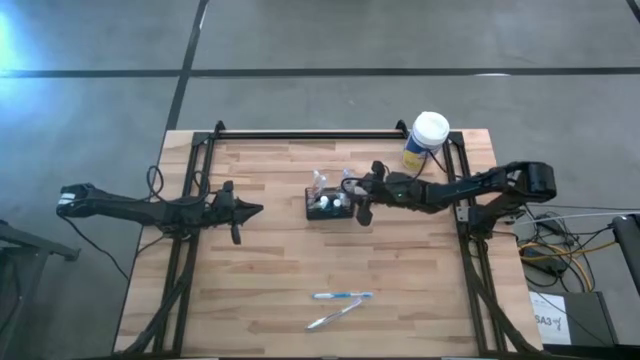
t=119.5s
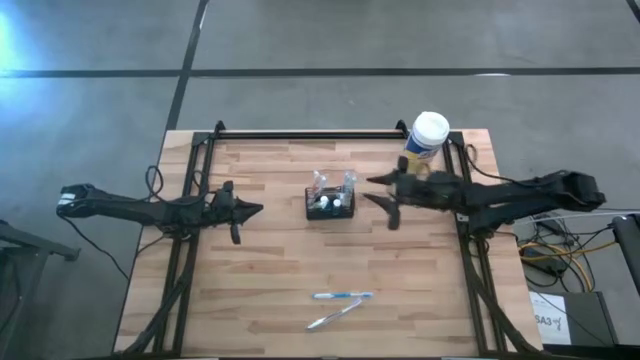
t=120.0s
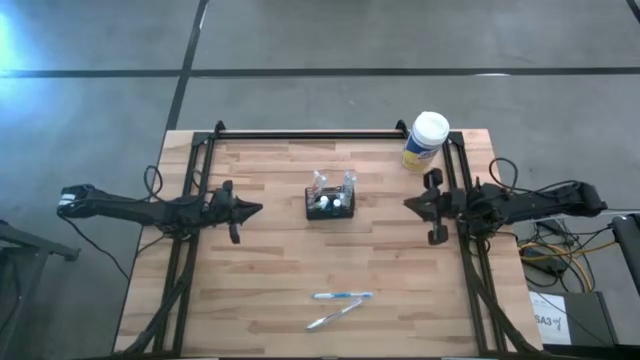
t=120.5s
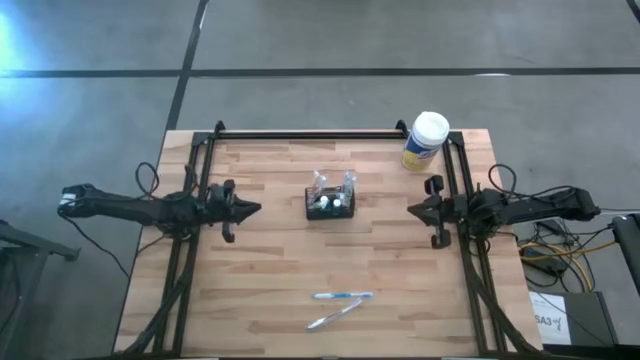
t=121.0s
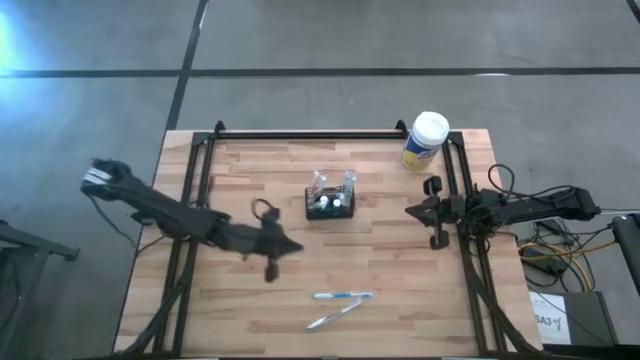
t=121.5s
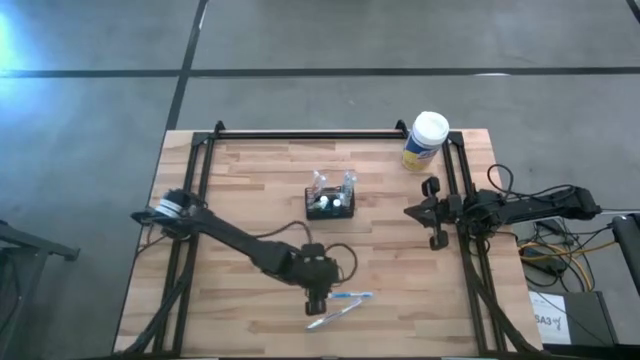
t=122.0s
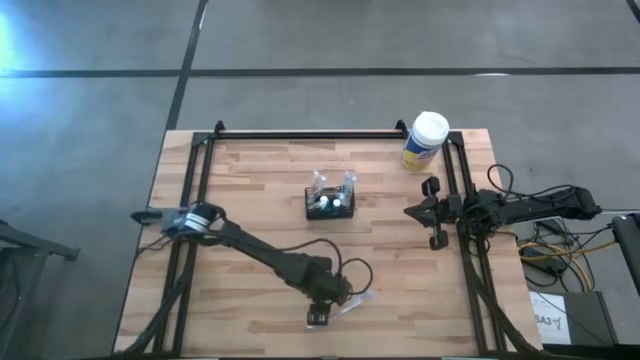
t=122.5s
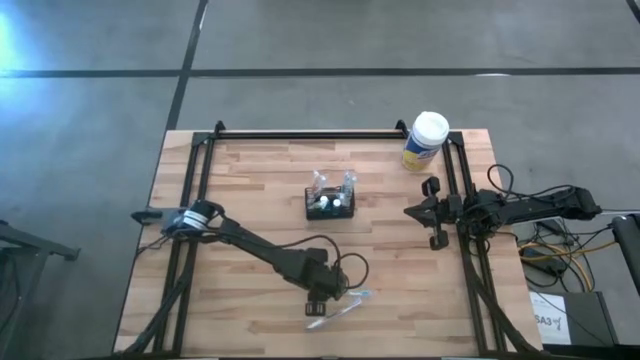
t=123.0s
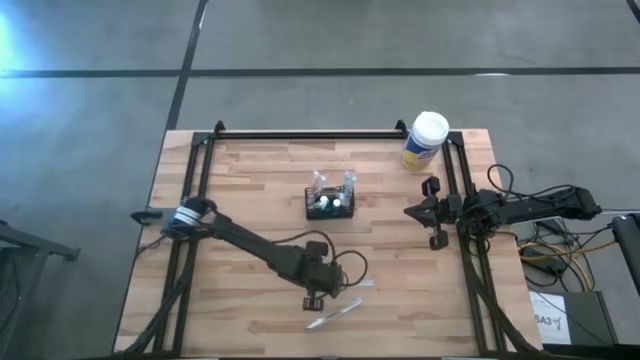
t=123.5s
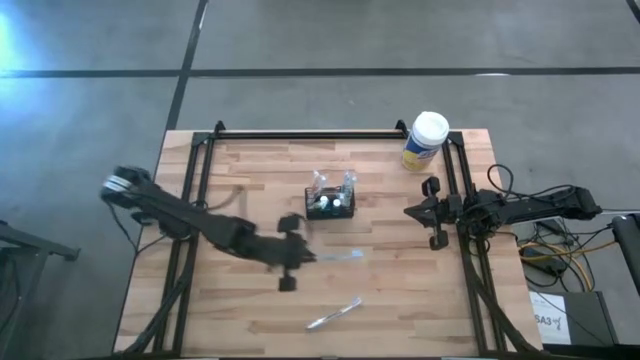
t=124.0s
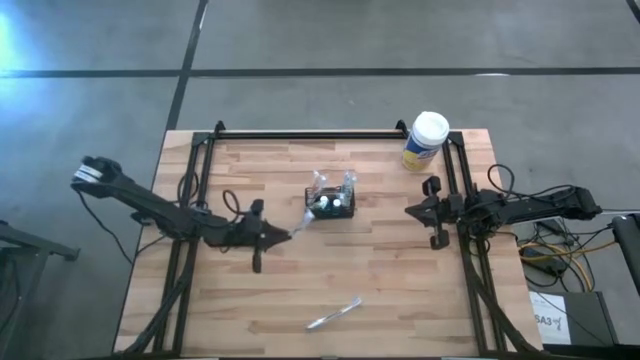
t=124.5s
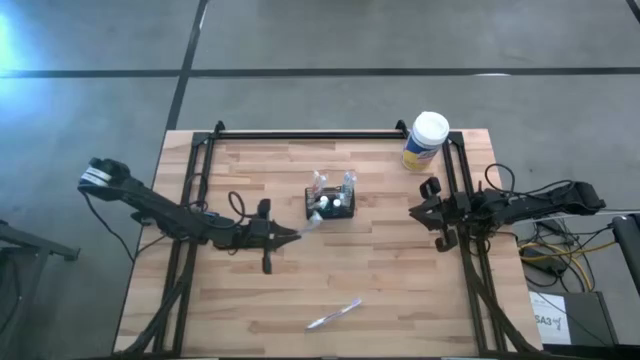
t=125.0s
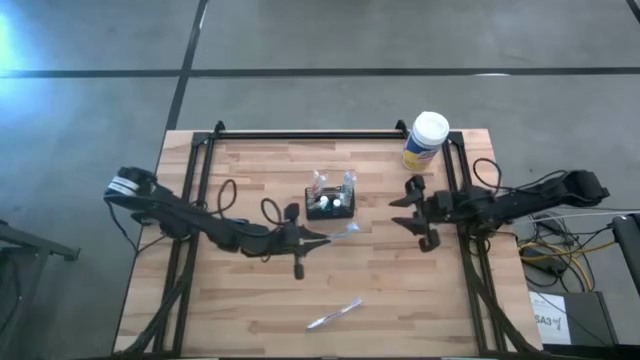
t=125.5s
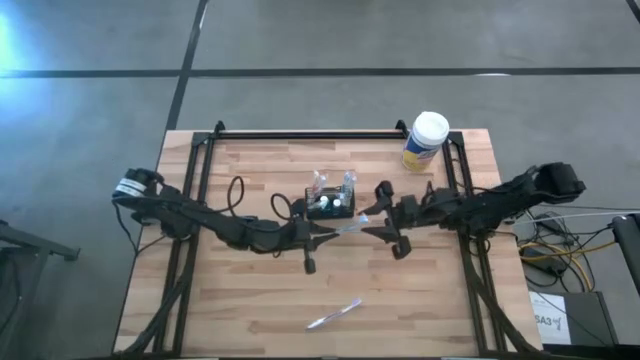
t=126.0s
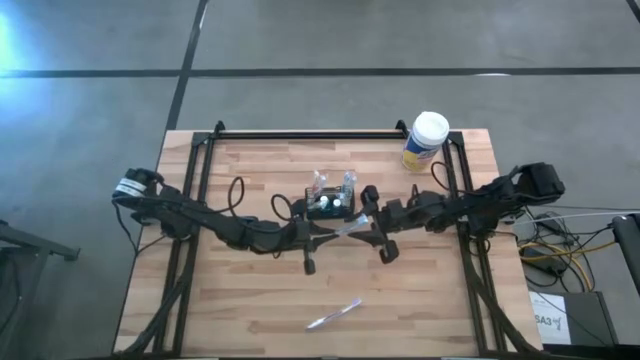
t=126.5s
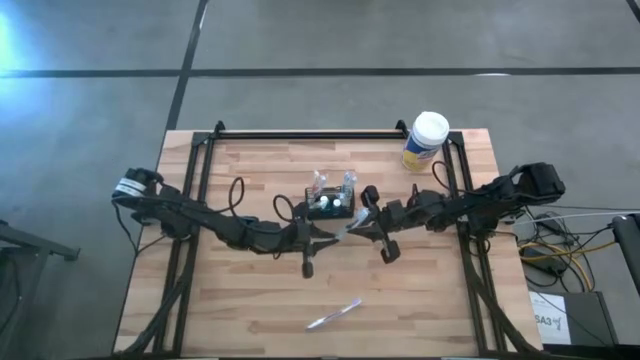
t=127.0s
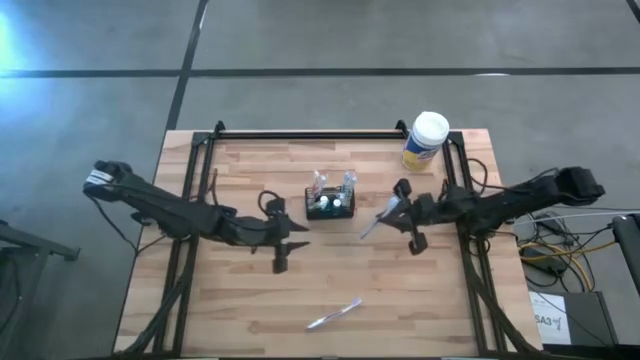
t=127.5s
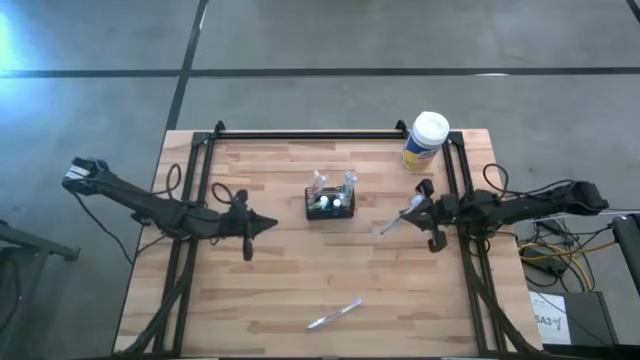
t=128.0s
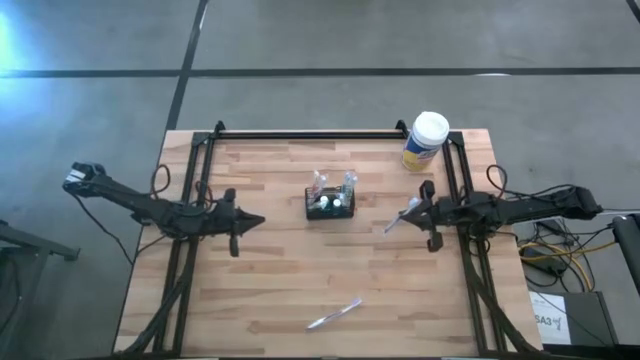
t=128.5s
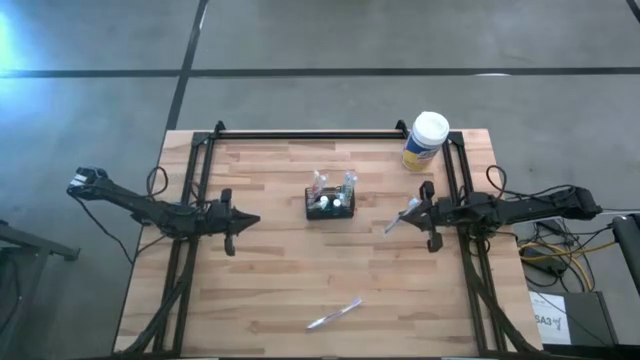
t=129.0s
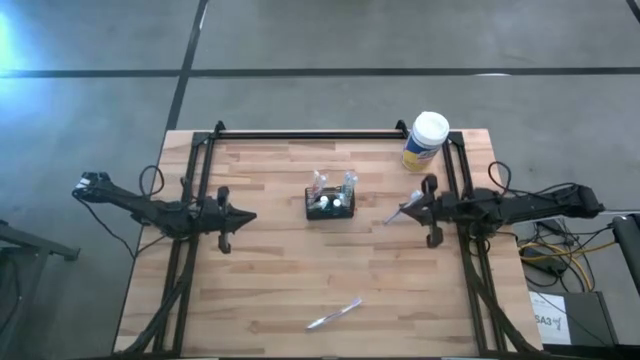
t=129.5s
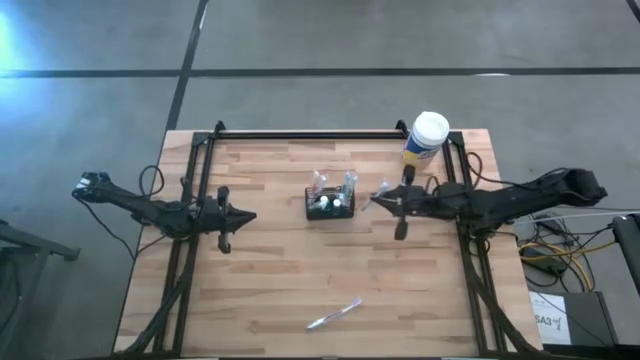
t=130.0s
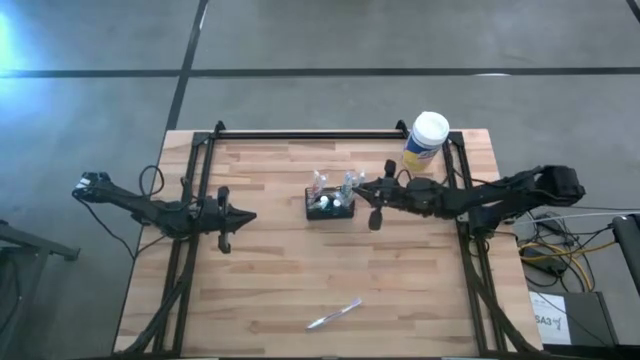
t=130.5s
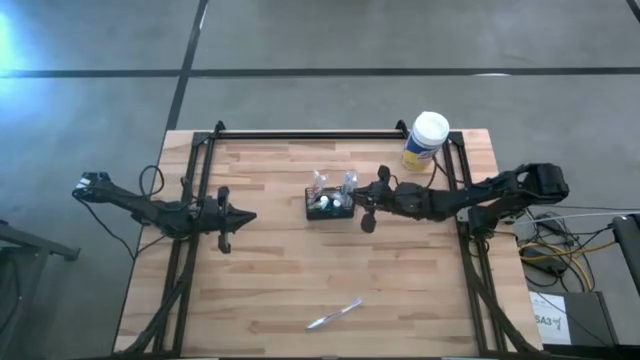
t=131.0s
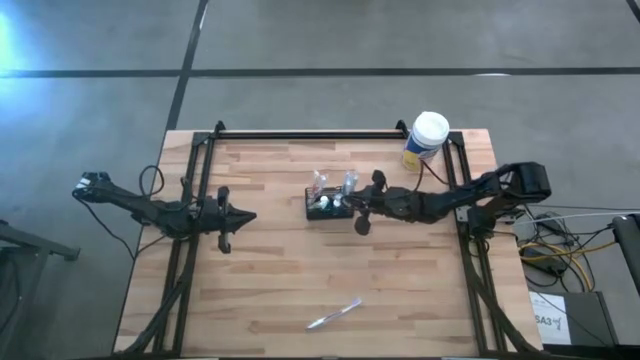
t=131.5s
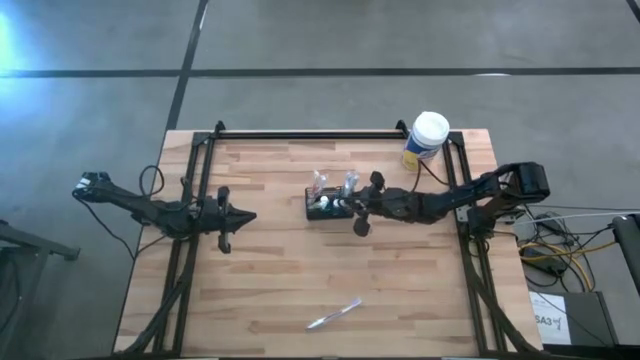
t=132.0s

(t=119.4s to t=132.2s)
Task: Pick & Place toothbrushing station
Put the blue toothbrush in the wire organizer

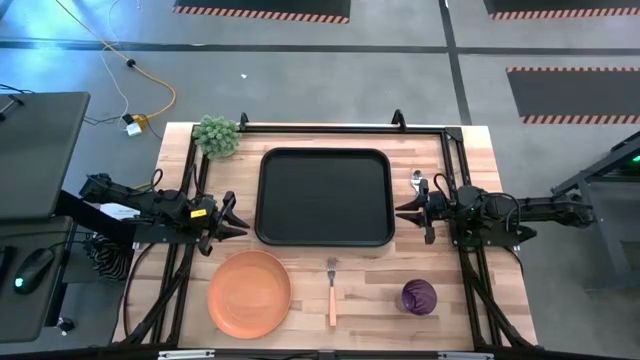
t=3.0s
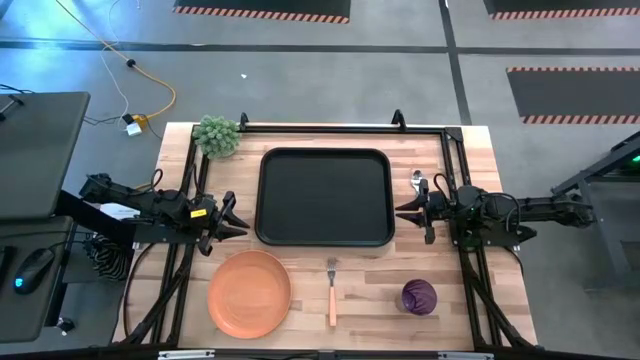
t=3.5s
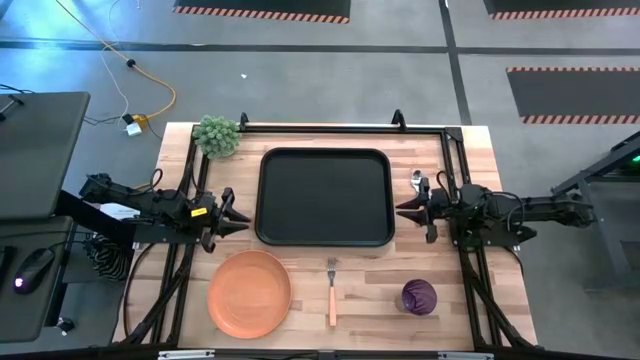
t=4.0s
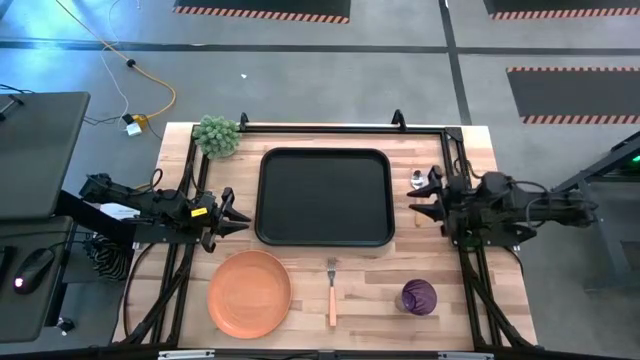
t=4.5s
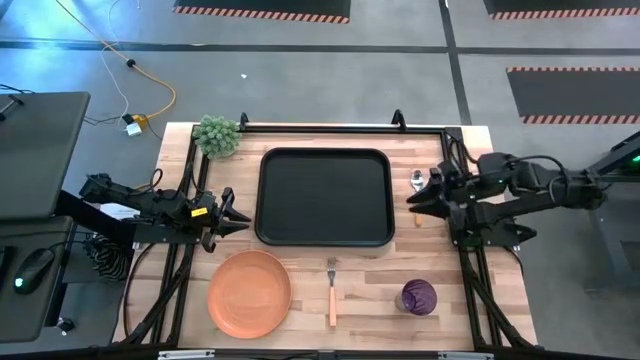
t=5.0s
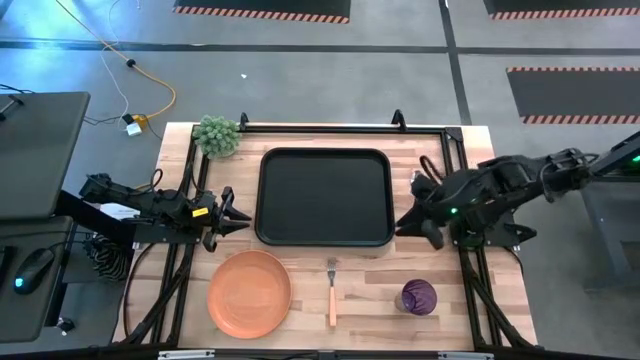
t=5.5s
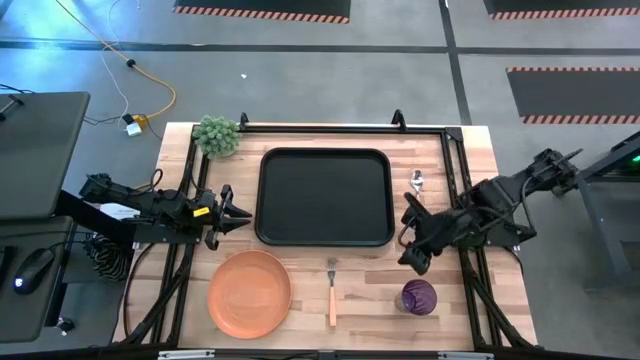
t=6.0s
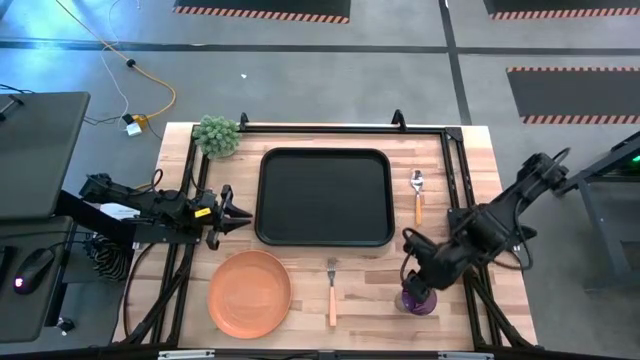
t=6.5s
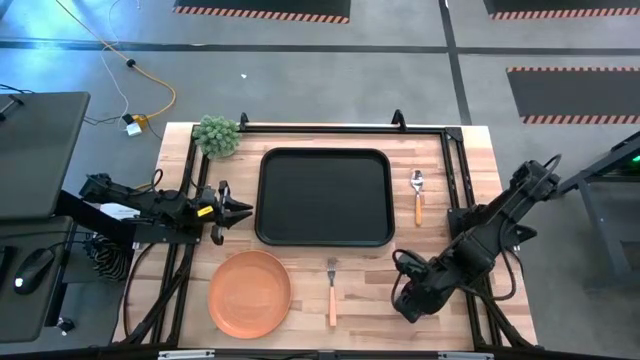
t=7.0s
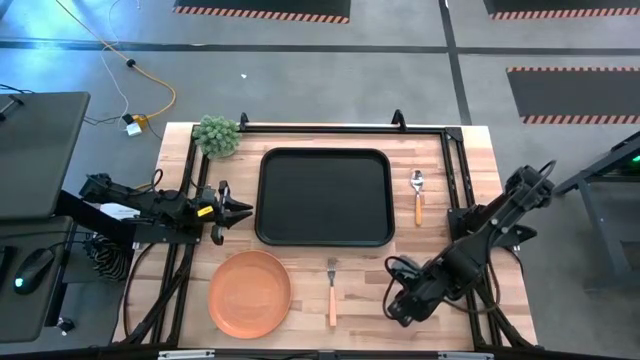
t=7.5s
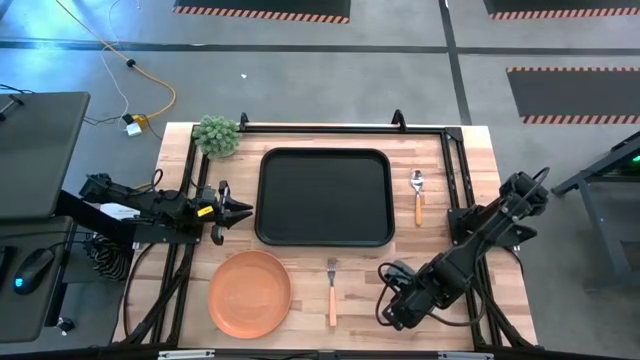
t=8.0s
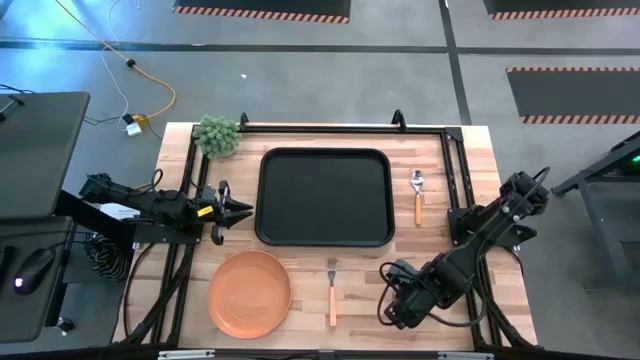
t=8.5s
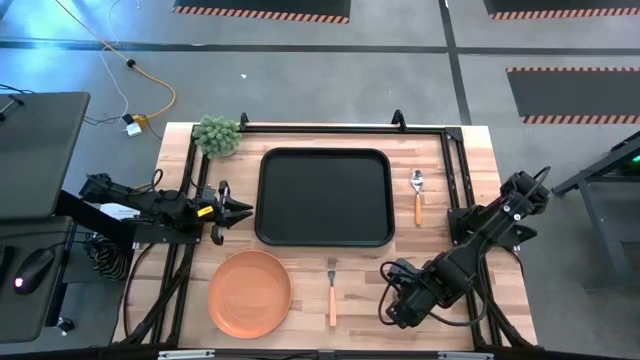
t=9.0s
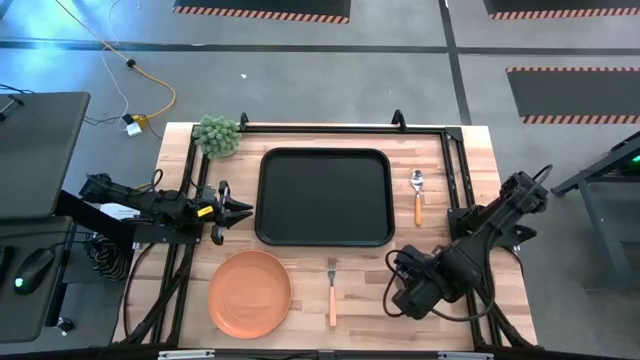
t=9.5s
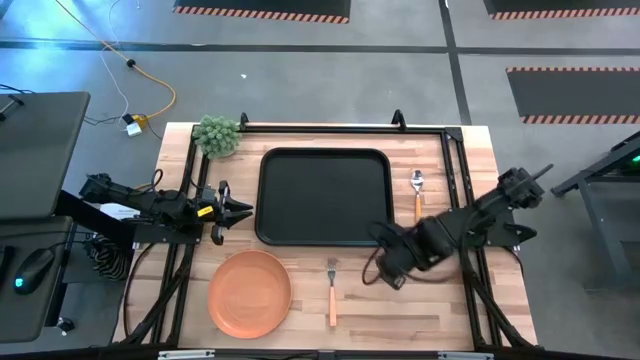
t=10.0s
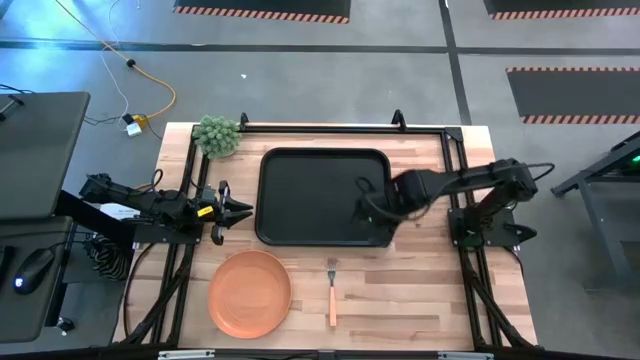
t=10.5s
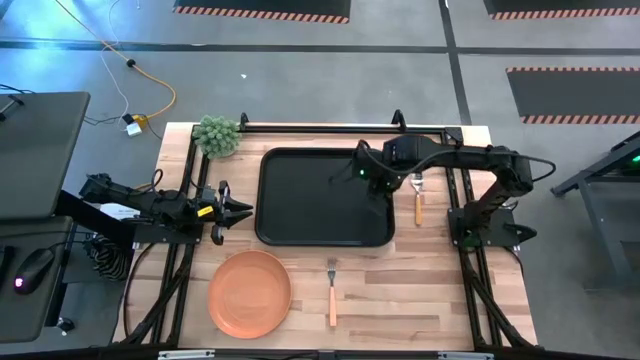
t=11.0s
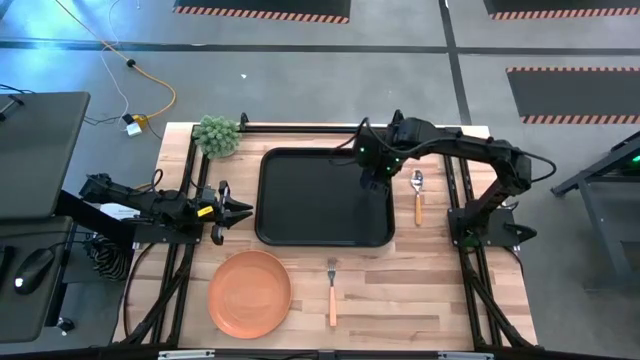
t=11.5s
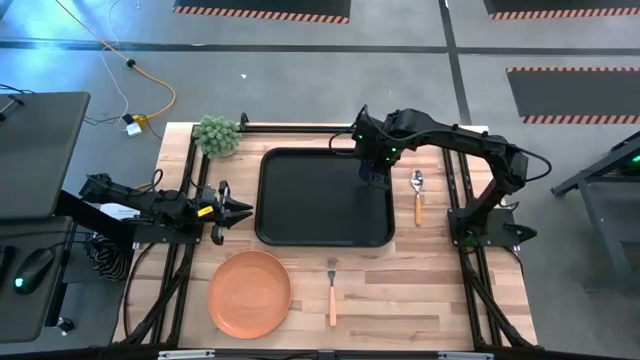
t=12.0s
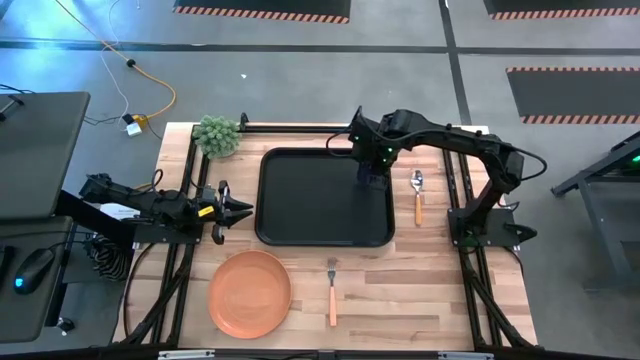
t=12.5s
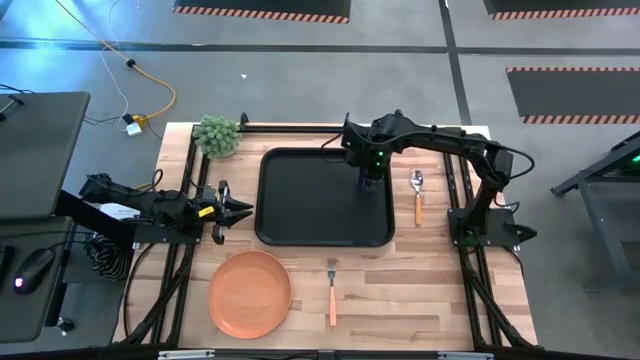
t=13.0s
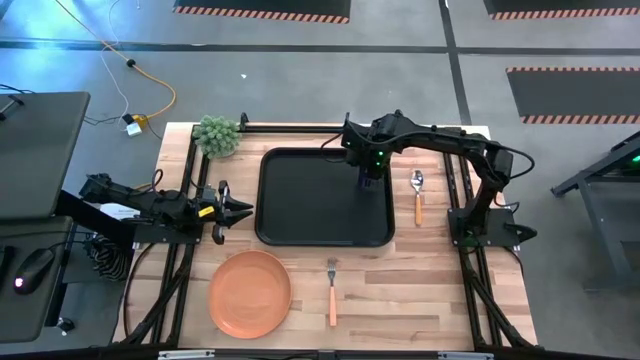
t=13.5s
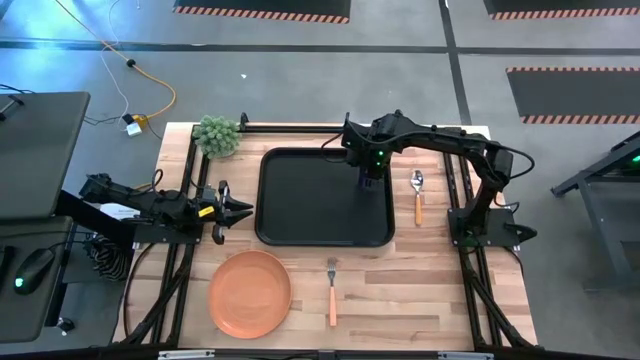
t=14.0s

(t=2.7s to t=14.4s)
Task: Pick and place plate/cup/fork/spoon on tray
Put the violet cup on the black serving tray
